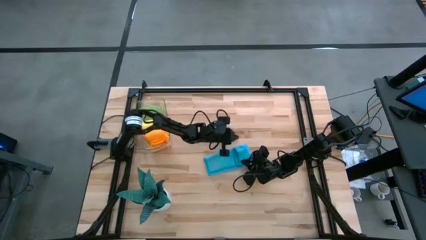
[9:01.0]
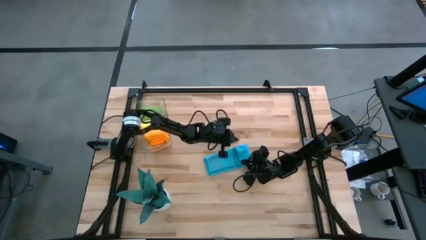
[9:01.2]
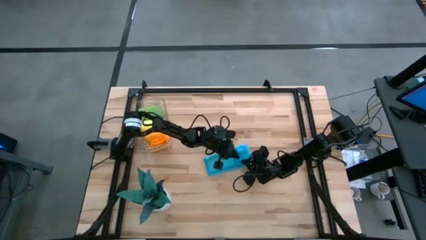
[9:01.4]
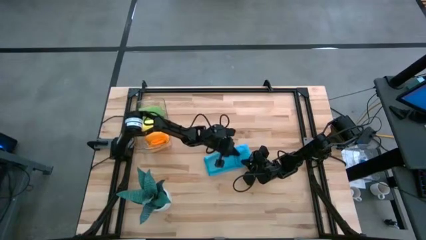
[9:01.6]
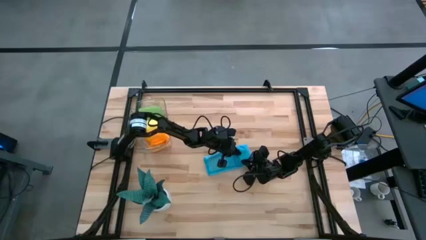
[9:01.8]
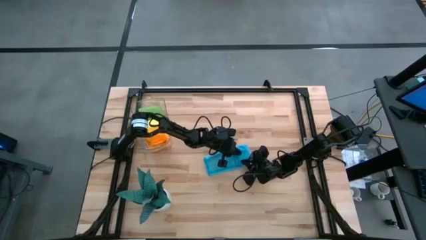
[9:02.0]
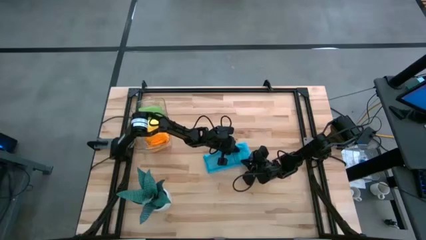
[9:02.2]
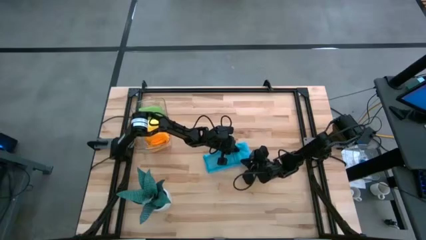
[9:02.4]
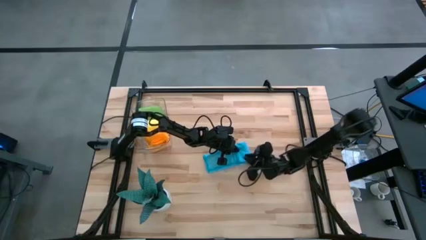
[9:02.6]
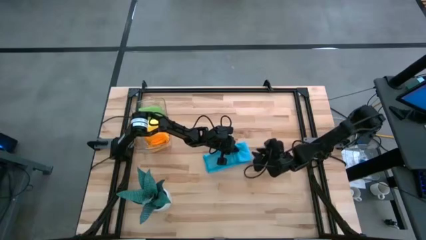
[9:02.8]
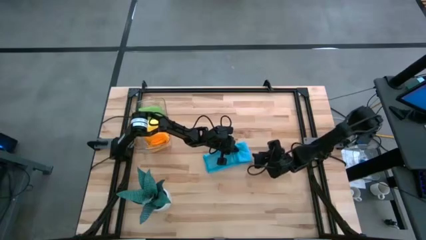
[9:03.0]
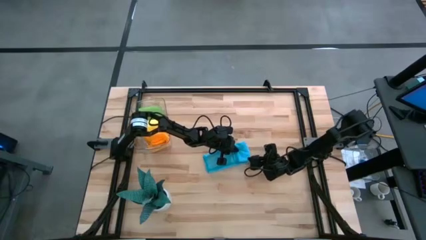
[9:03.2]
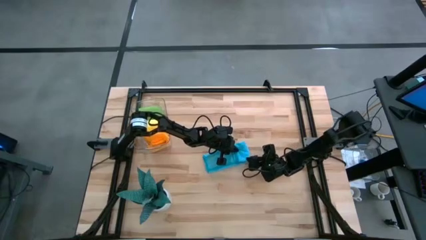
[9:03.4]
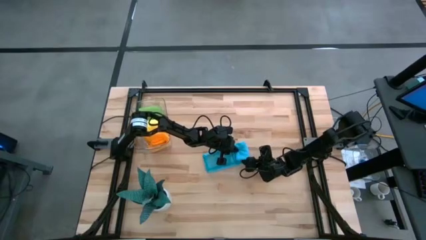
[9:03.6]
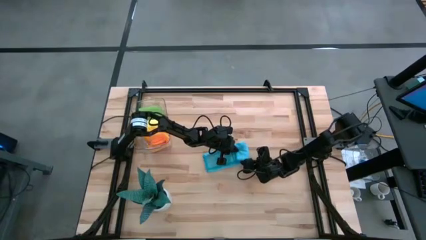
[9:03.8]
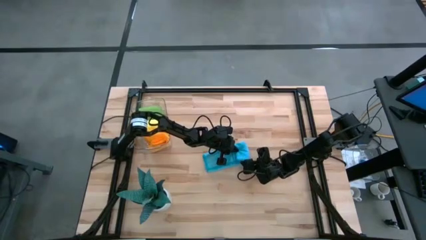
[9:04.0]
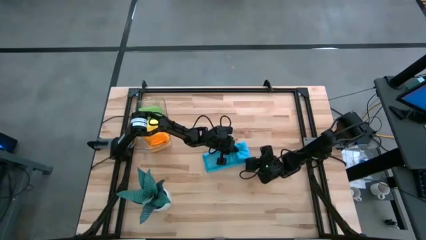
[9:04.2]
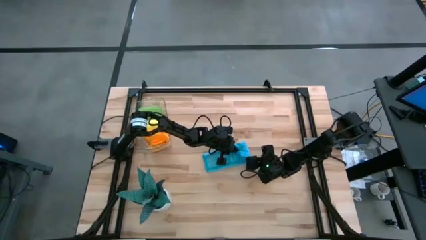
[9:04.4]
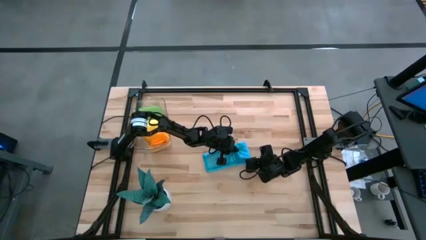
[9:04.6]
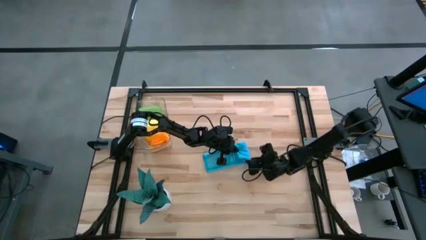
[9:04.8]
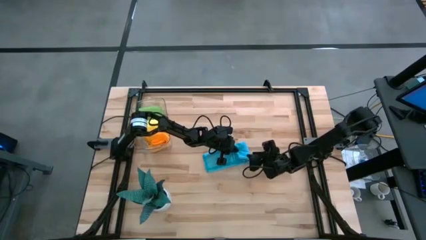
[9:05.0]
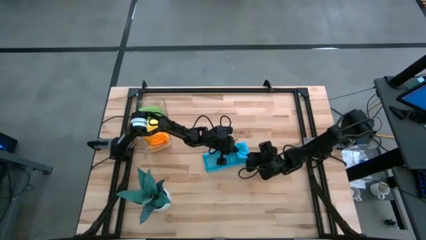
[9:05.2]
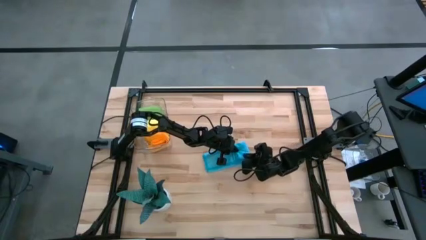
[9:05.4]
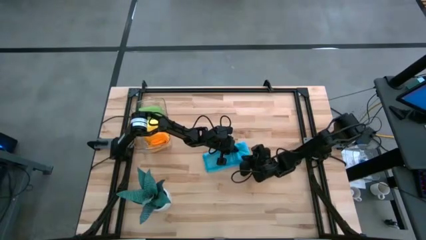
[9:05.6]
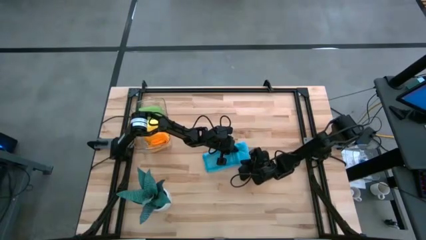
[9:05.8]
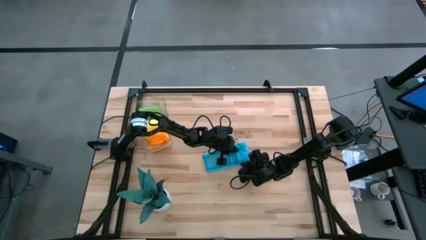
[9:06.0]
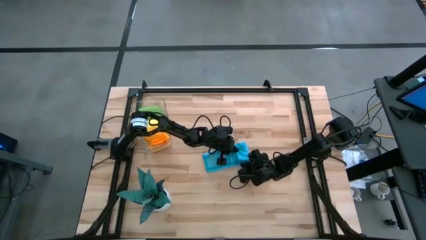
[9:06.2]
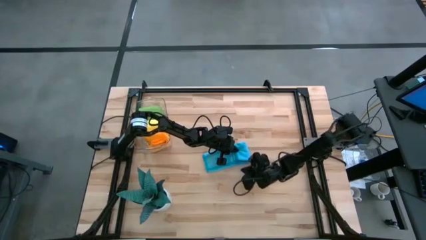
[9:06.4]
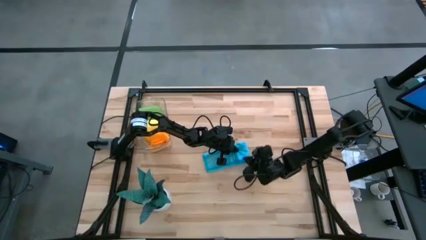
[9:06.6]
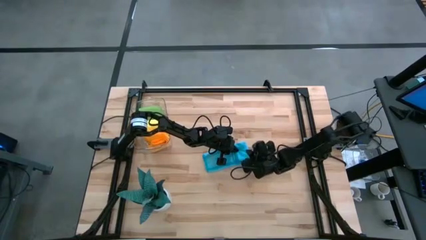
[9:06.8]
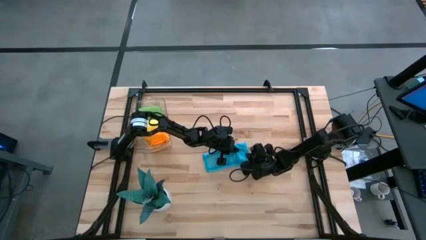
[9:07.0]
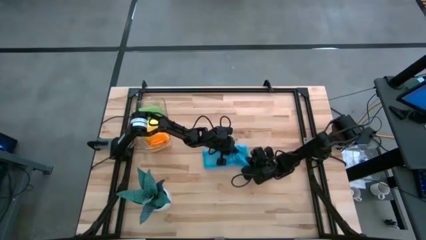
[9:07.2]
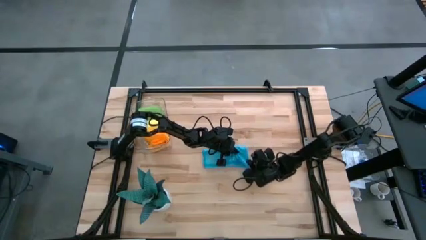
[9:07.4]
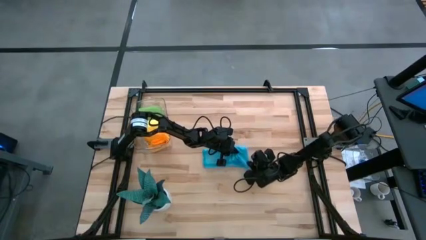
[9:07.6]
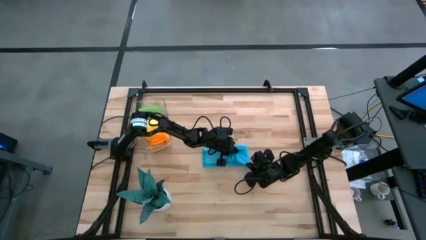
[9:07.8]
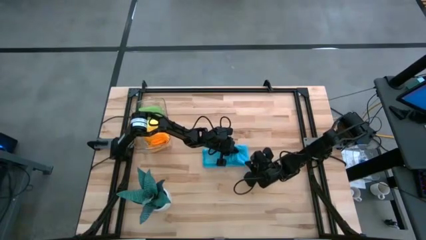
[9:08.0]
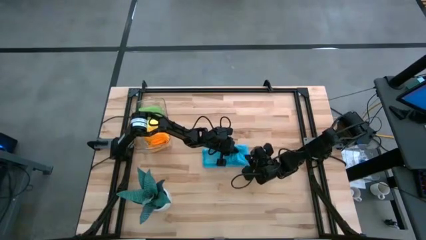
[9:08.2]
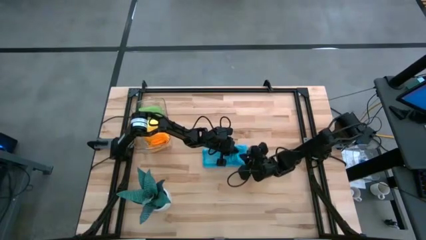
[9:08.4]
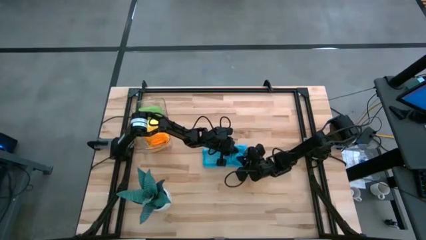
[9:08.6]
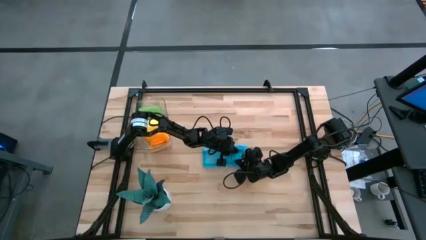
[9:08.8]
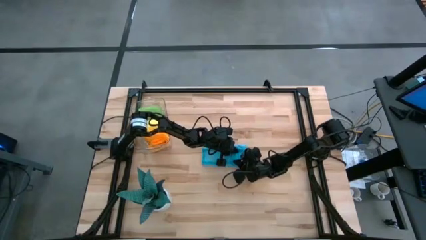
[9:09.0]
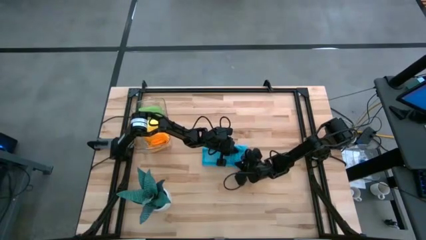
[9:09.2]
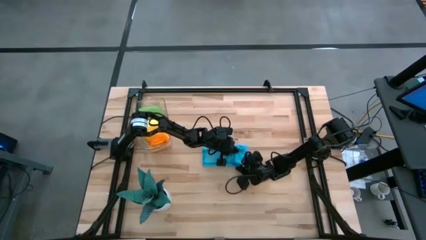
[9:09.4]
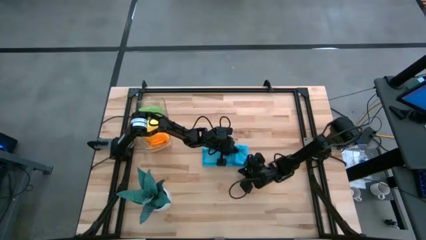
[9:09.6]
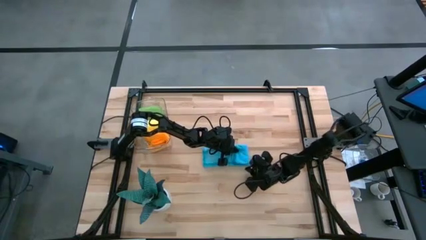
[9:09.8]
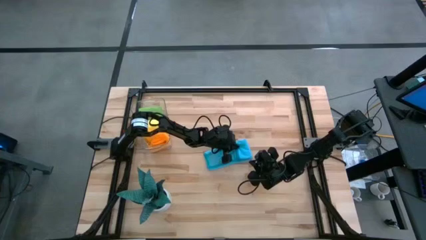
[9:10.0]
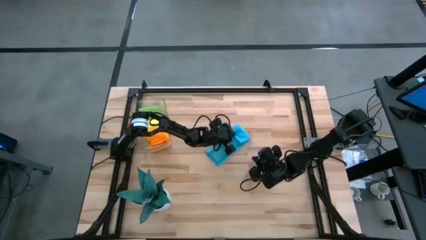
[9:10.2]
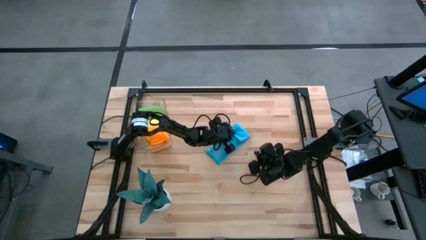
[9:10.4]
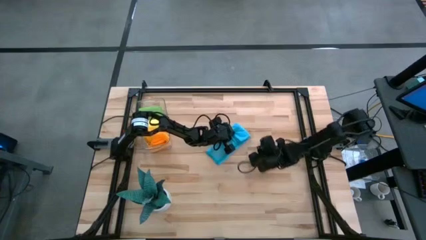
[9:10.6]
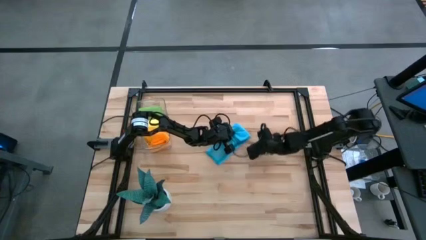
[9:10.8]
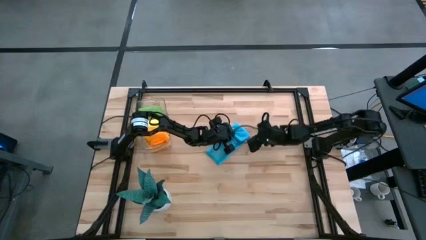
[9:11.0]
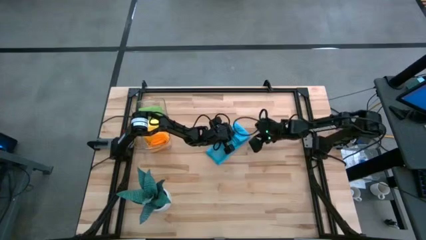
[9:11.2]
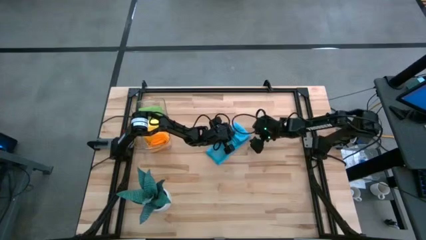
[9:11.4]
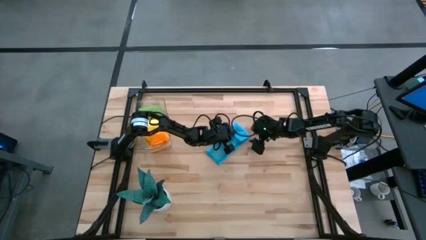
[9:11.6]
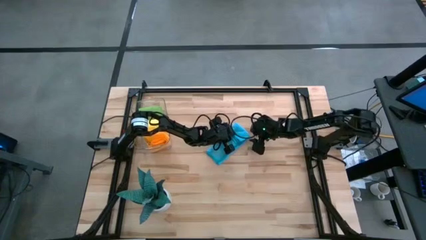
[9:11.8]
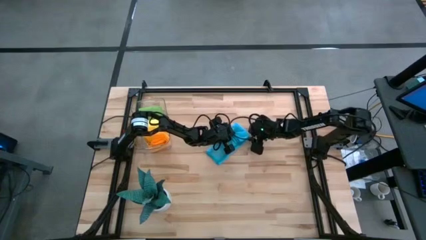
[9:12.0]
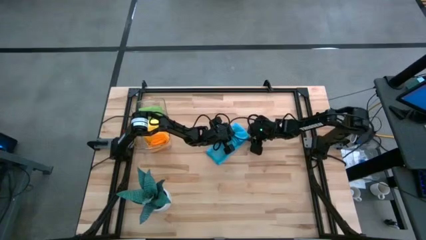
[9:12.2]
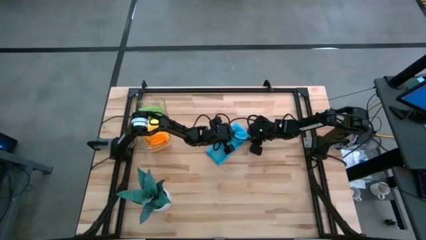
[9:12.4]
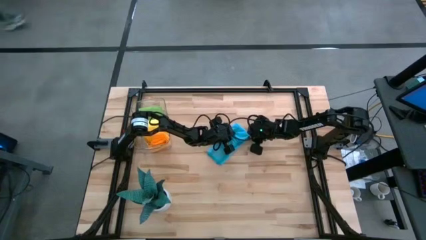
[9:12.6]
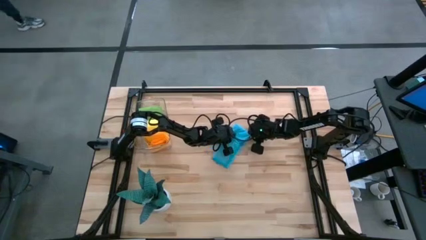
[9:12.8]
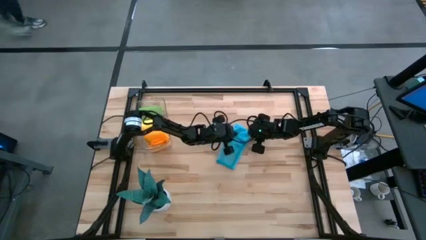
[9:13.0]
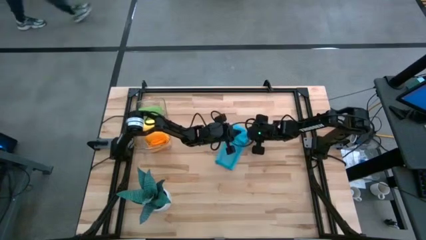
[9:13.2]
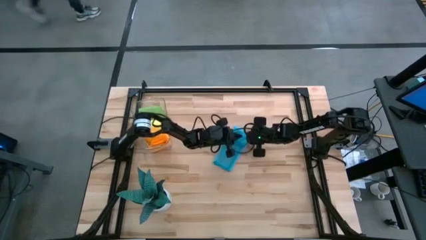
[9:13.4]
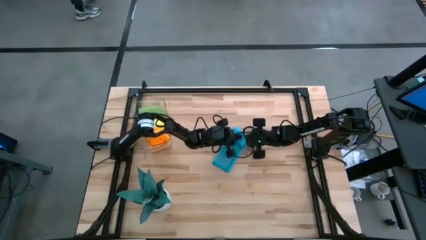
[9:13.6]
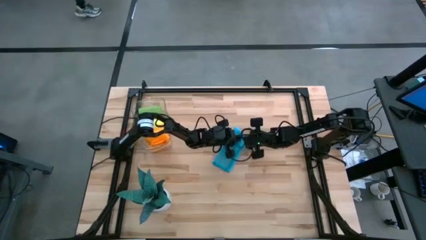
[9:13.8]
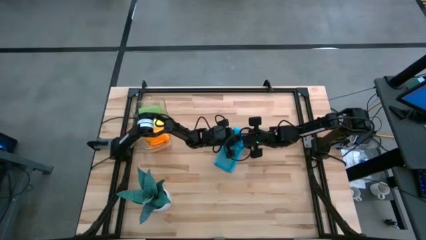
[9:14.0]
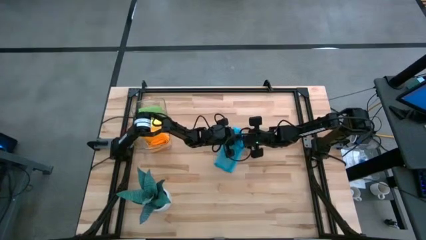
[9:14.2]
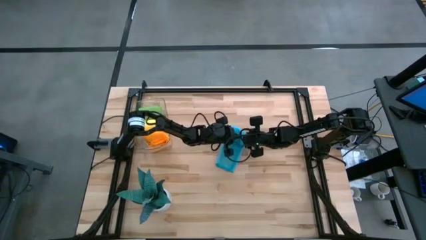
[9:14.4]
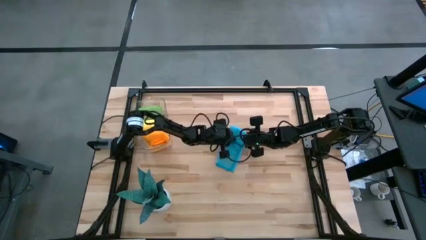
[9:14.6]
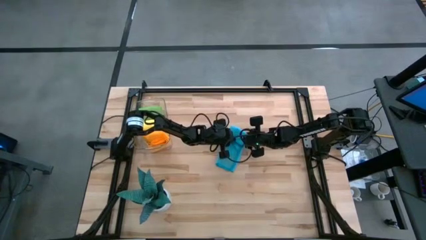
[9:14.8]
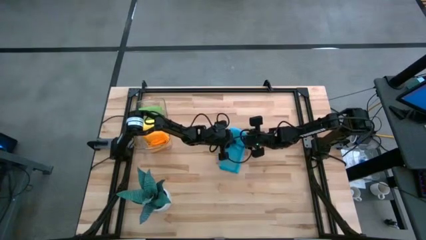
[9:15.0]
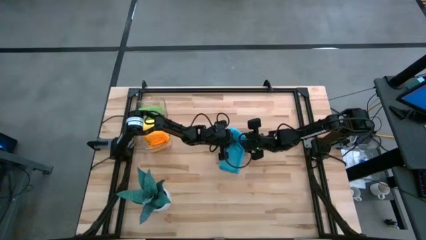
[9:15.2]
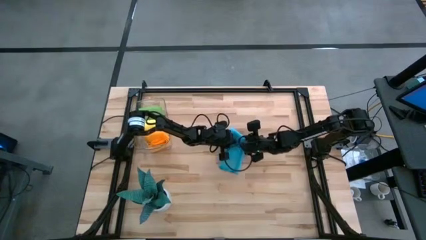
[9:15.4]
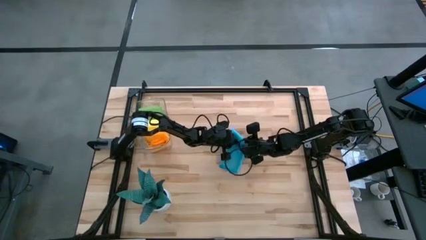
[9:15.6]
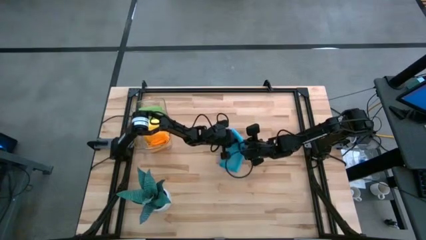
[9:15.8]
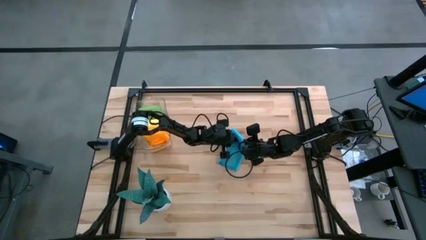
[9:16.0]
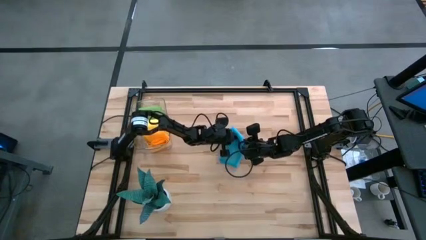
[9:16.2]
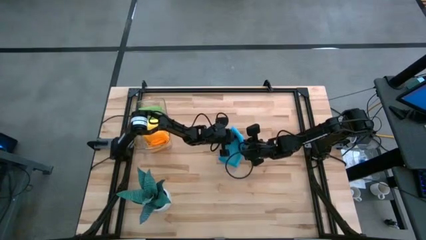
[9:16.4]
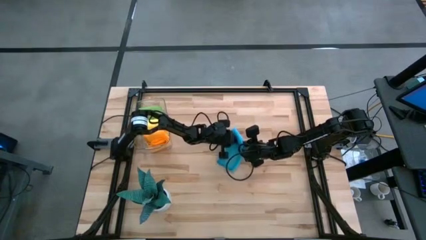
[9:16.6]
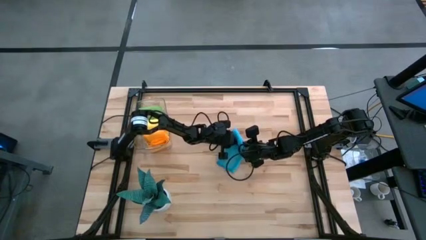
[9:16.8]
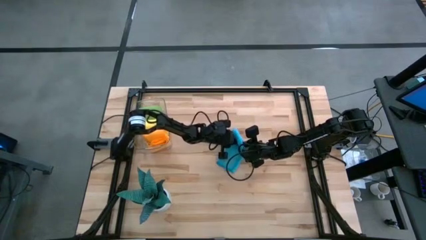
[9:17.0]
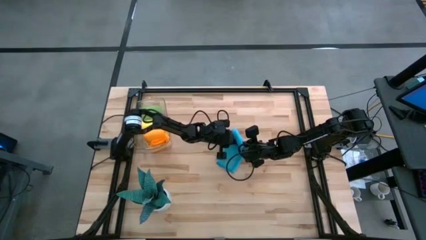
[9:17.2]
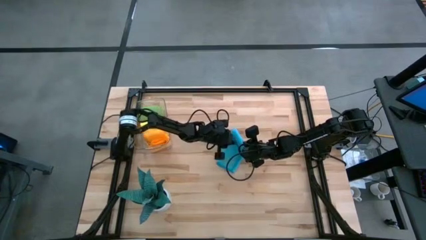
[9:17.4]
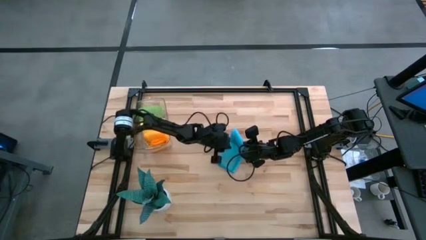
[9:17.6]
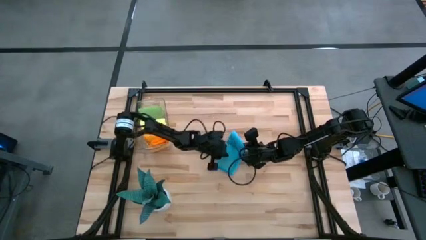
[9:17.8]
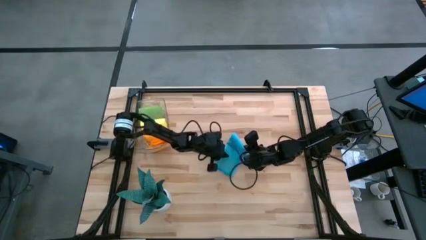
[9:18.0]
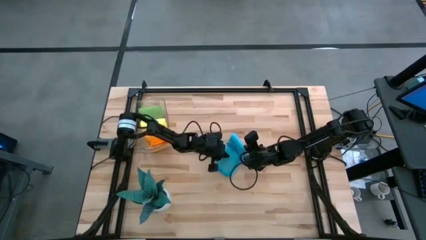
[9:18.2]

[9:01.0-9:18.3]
Task: Roll microfiber towels into tight, uniform cylinder then place into a basket
Roll the blue microfiber towel
